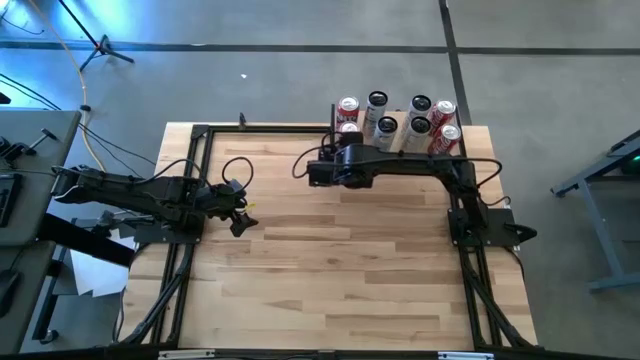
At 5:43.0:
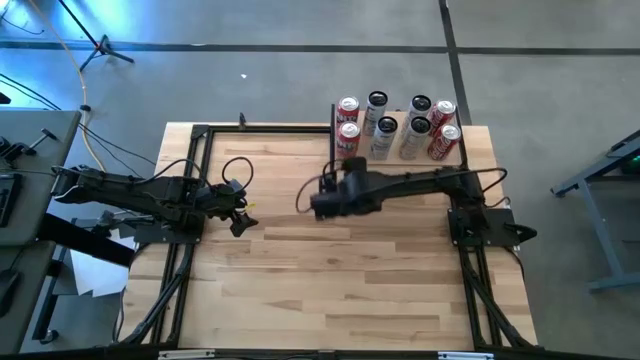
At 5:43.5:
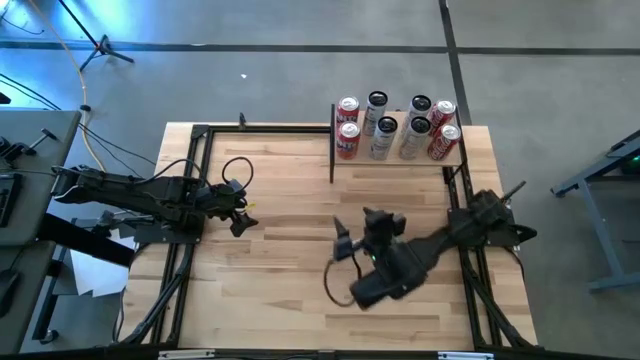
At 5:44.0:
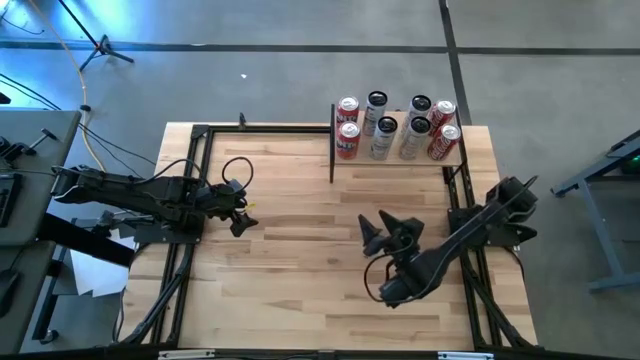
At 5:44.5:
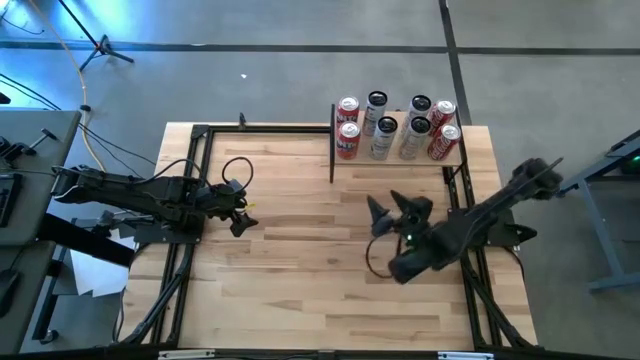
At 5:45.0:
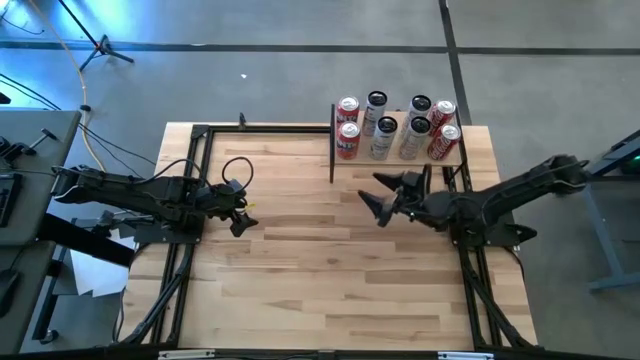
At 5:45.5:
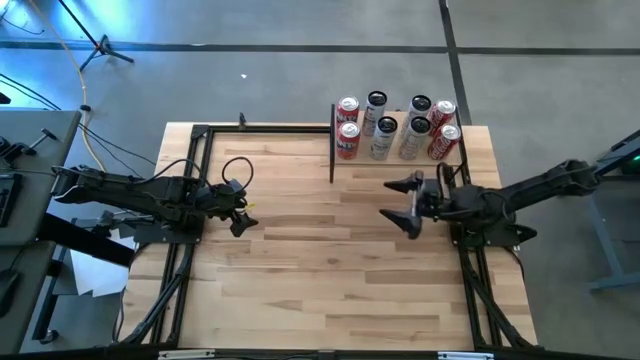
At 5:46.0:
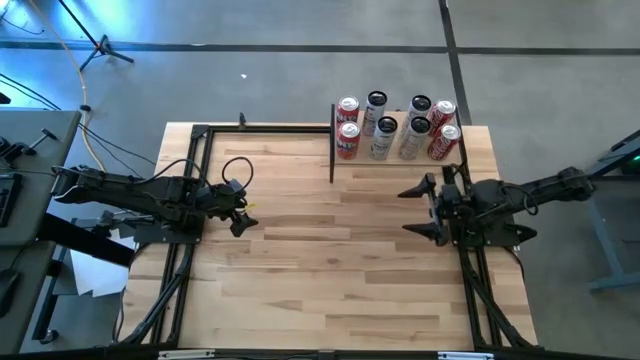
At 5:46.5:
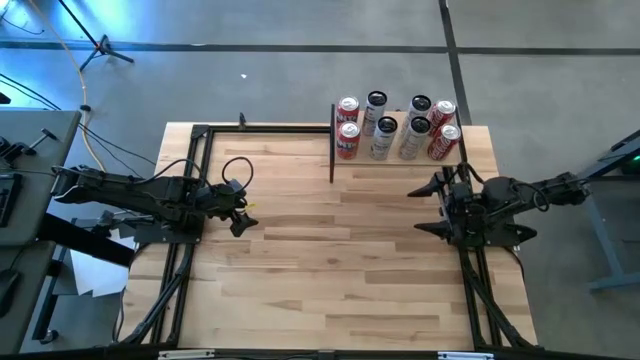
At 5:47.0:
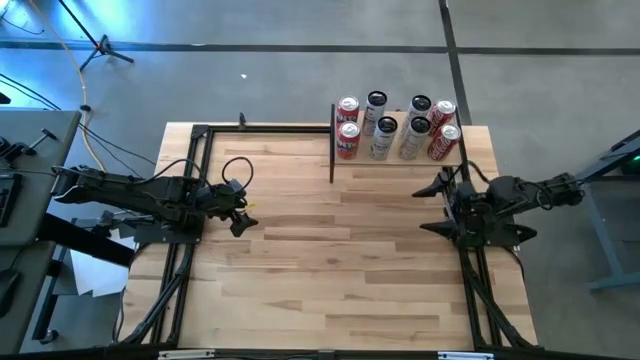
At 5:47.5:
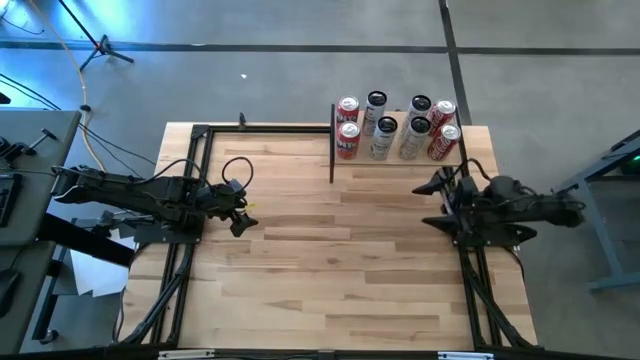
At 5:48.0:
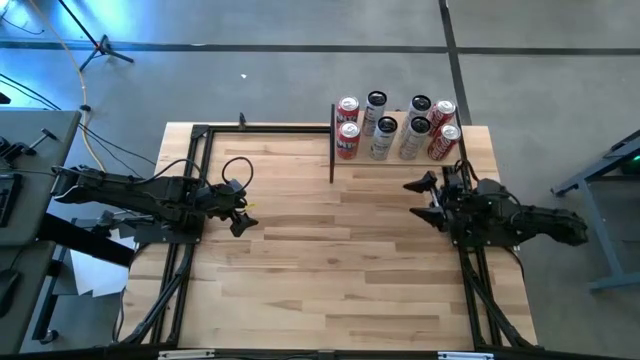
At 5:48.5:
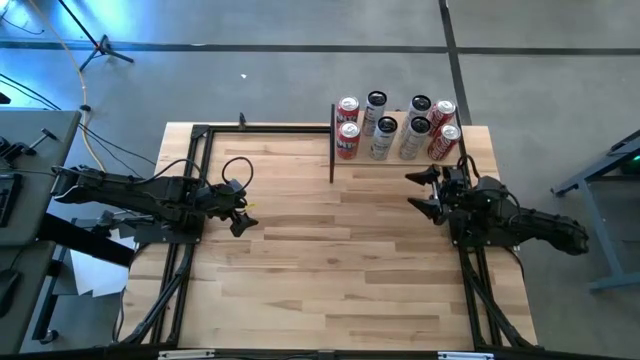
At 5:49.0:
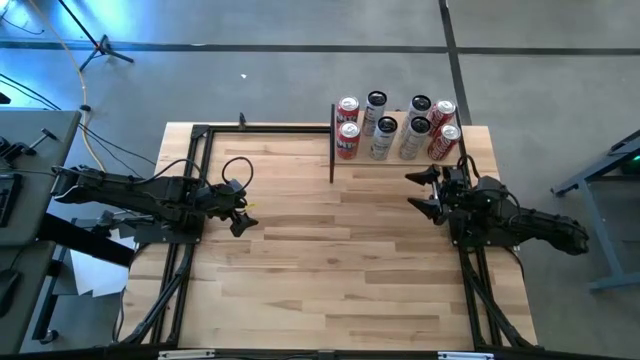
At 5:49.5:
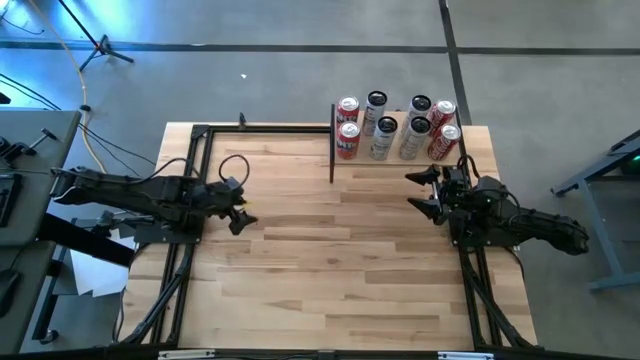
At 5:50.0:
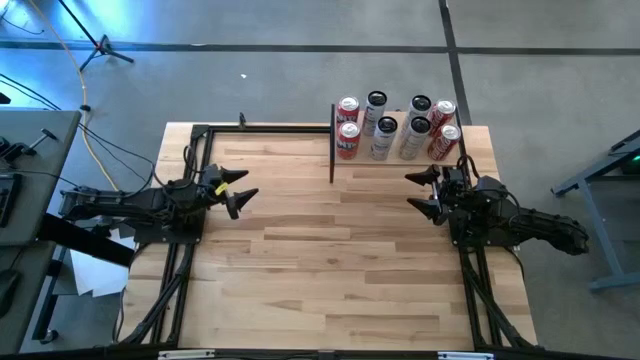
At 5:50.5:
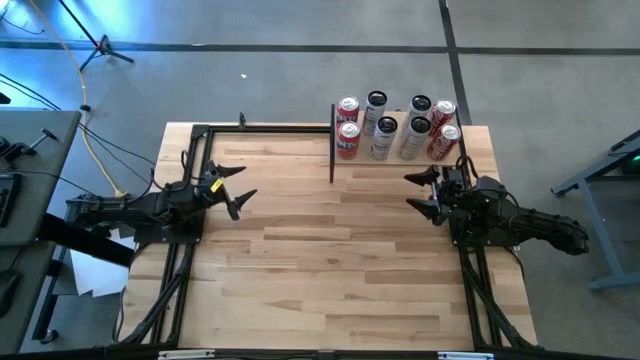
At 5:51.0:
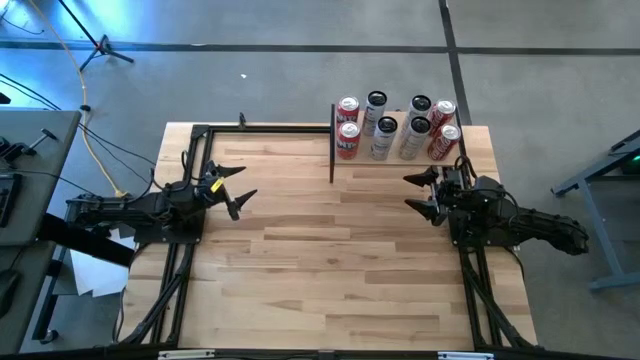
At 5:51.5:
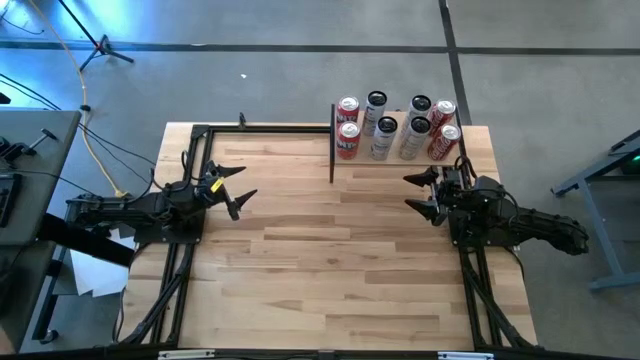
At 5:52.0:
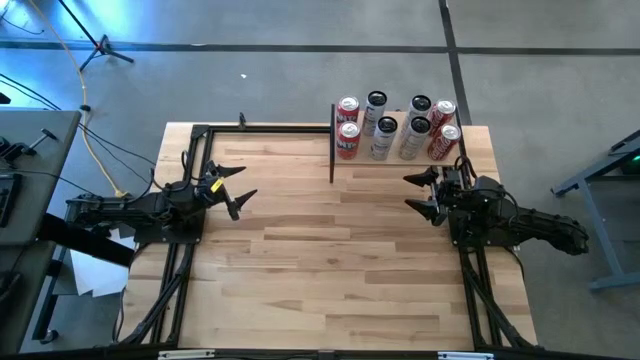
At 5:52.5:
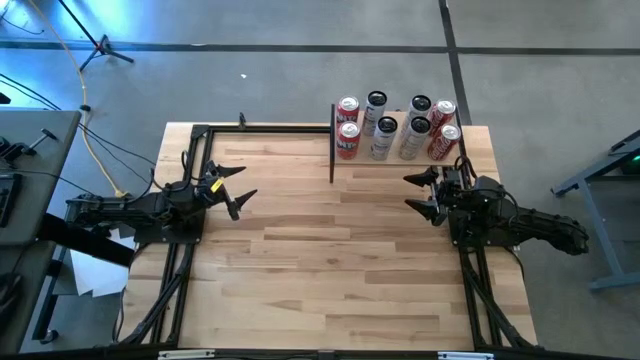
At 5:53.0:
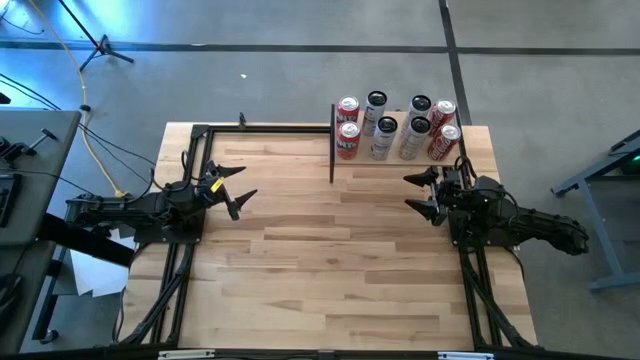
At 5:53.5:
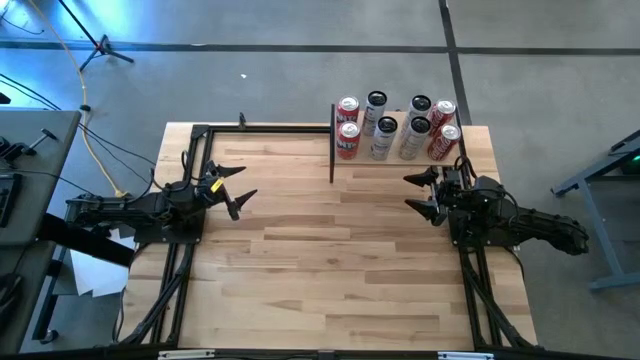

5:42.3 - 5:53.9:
Task: Place canned beverage on shelf
Return to Home Position

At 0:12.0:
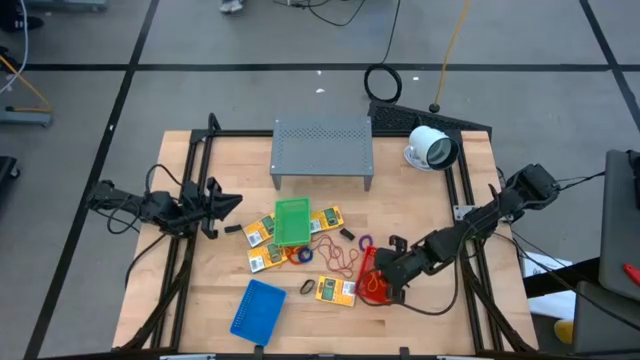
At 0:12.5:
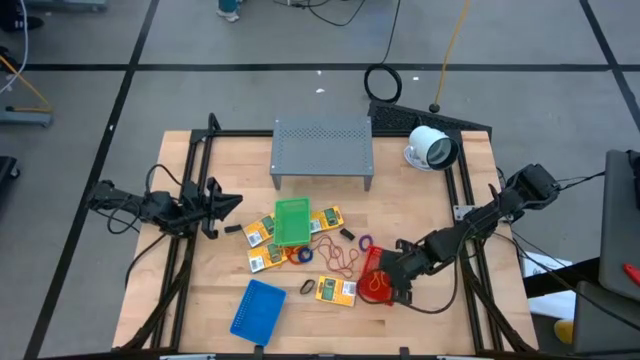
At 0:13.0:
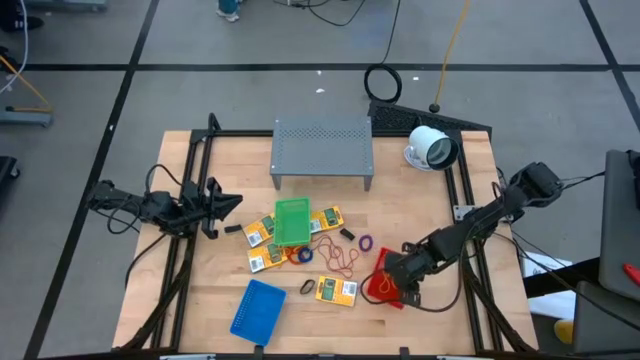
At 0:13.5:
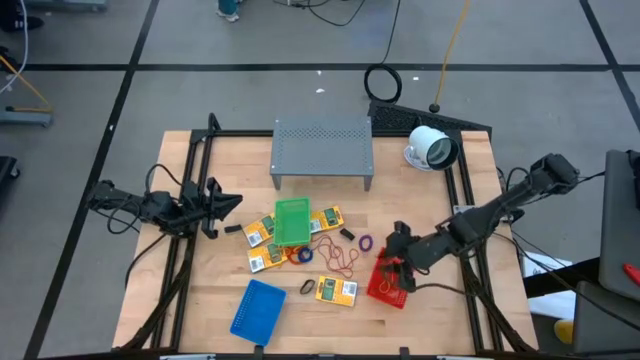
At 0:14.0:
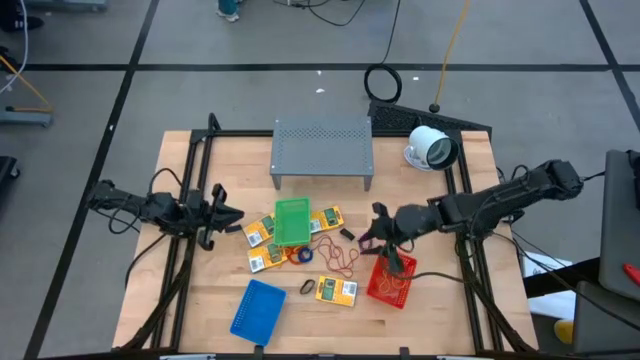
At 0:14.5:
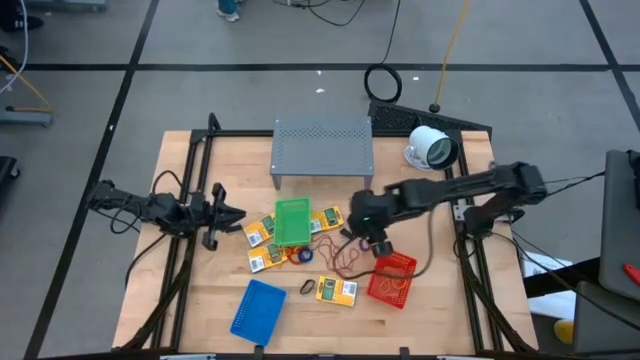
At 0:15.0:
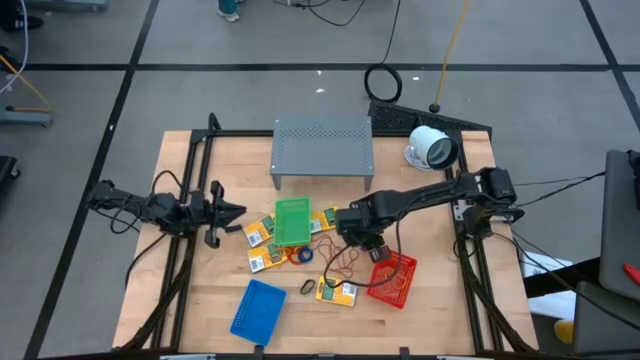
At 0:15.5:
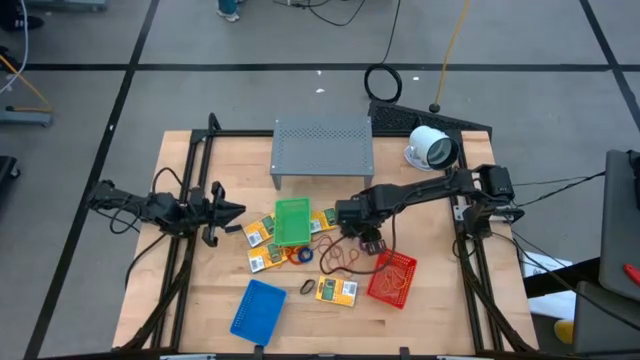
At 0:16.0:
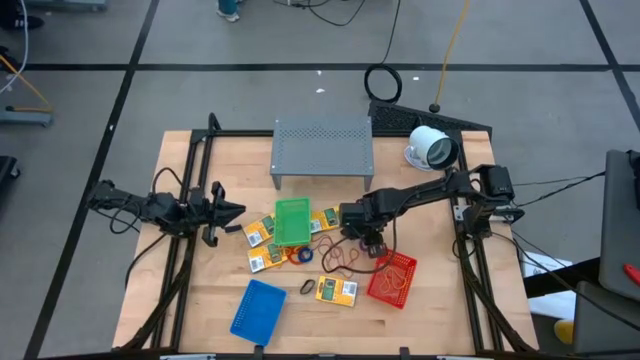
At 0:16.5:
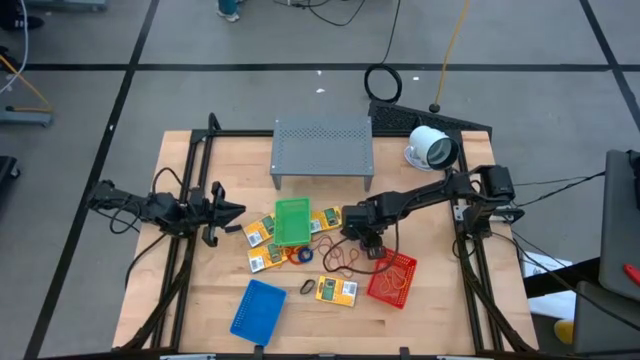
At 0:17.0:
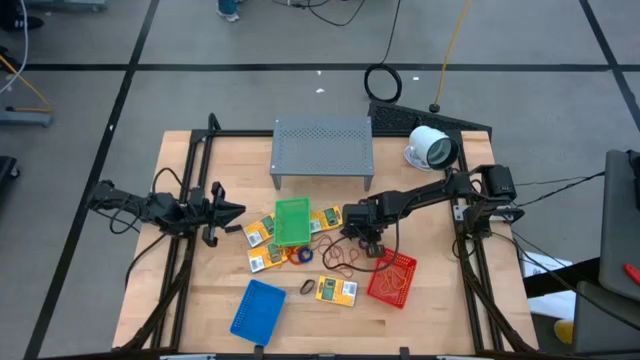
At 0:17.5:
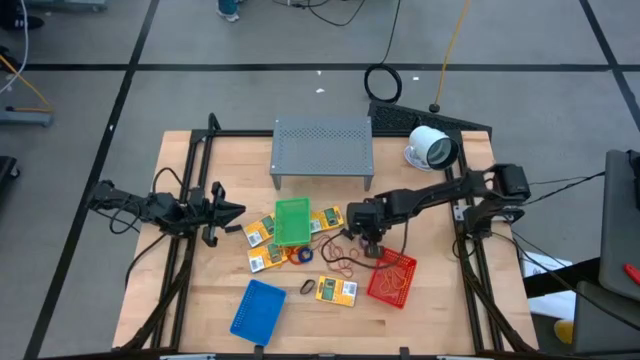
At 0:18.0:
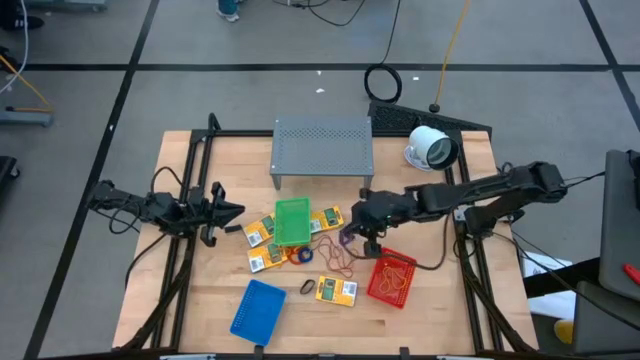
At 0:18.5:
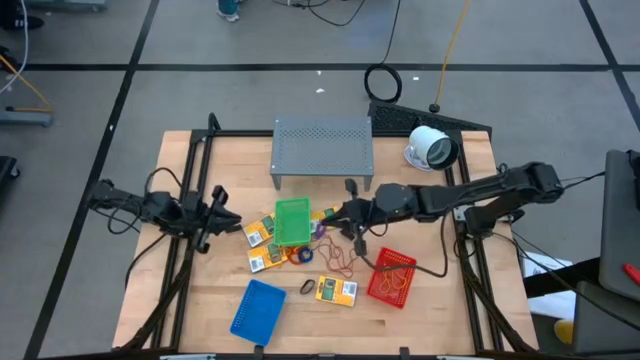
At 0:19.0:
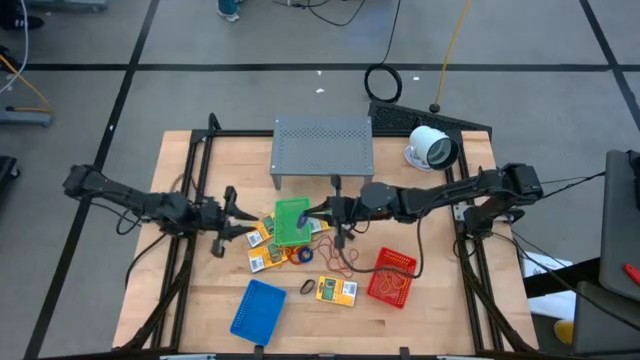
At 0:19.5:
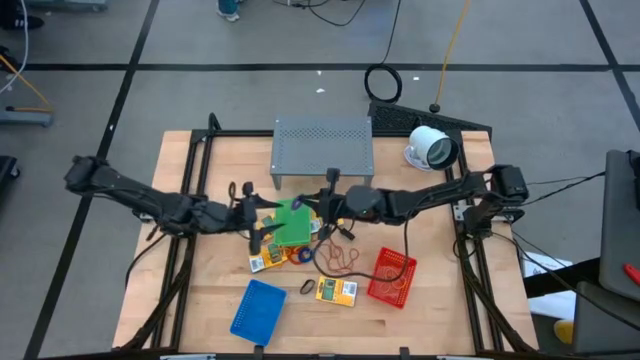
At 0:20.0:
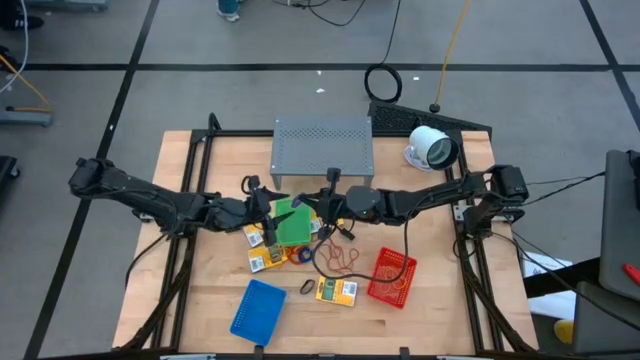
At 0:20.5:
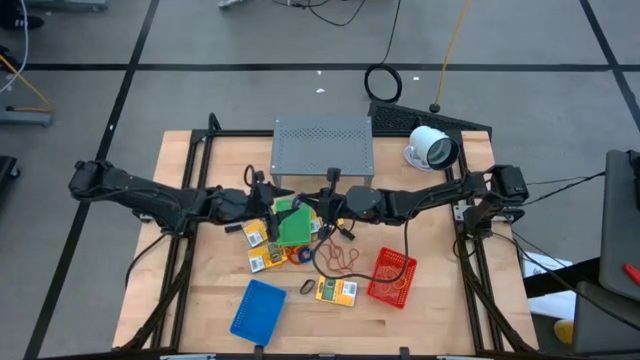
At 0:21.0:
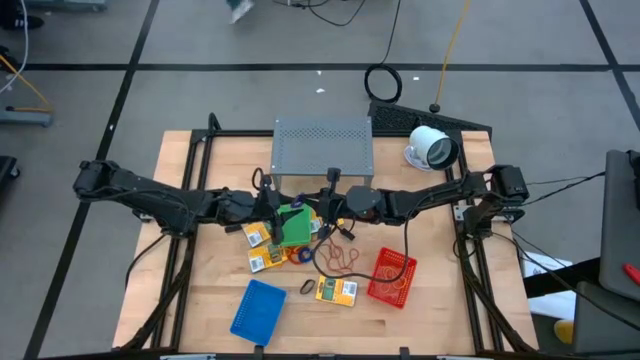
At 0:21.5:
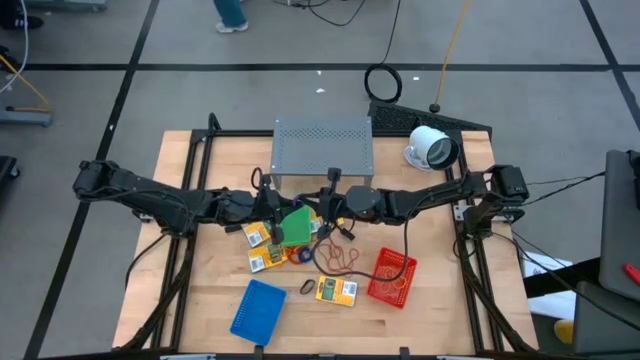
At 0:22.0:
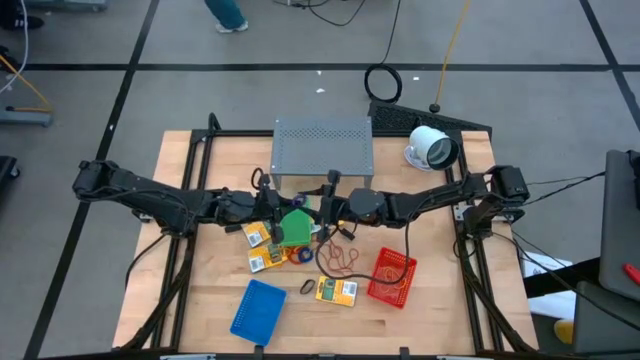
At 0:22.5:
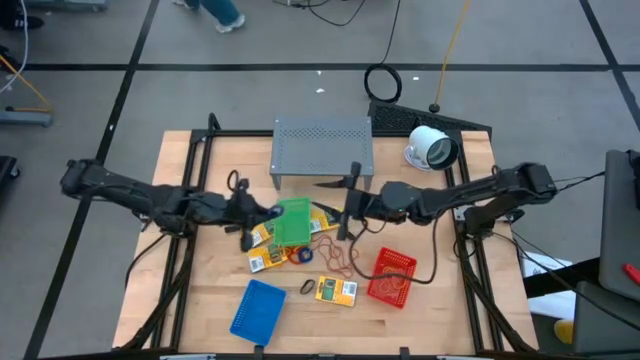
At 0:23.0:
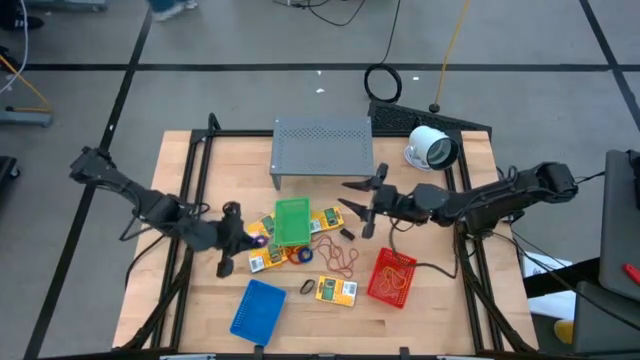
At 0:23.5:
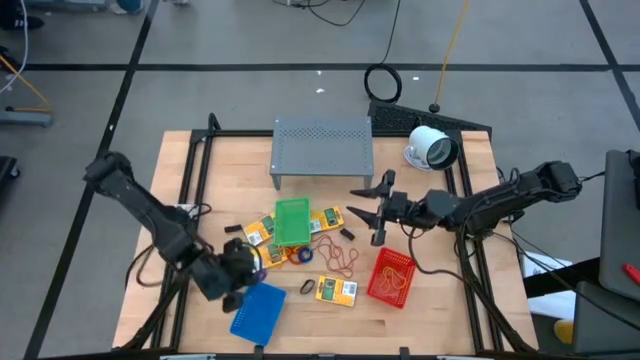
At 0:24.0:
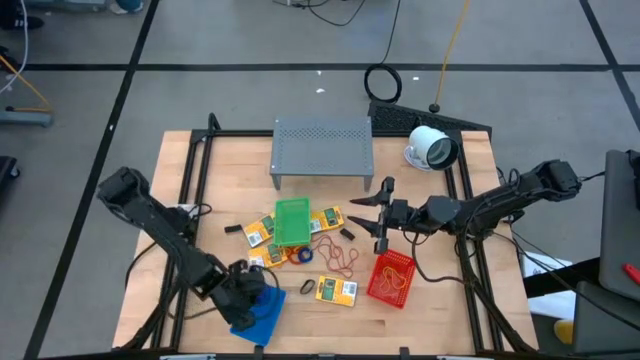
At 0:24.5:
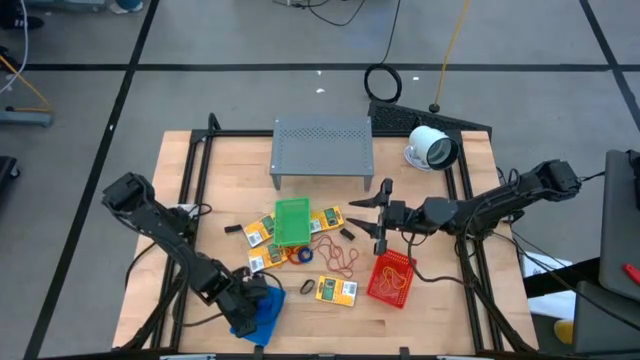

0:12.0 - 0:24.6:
Task: Pick & Place Office Desk Supplies
Put the purple spring rubberband band into the blue bin
